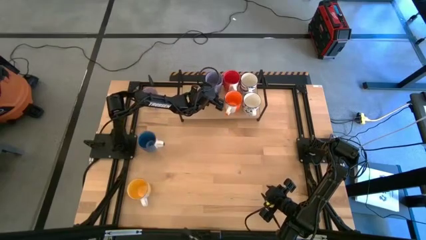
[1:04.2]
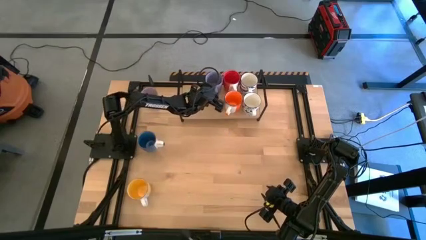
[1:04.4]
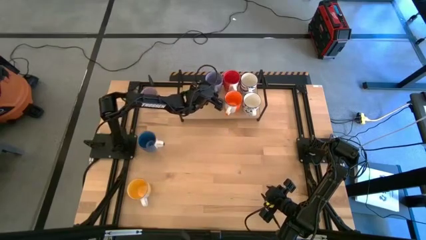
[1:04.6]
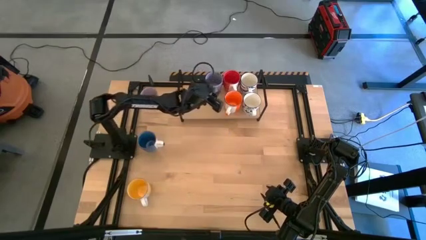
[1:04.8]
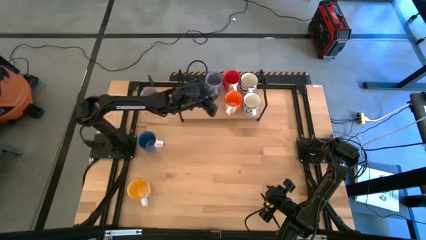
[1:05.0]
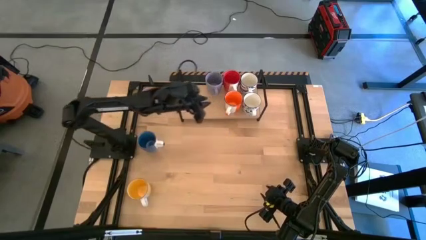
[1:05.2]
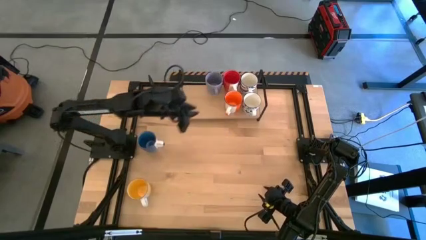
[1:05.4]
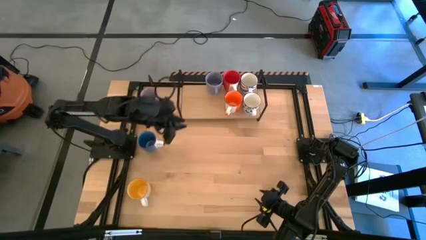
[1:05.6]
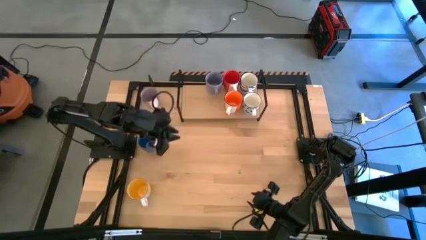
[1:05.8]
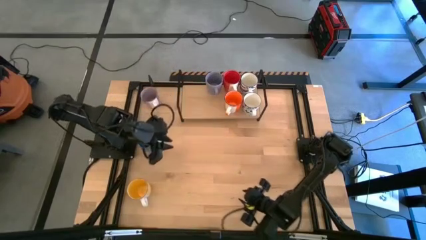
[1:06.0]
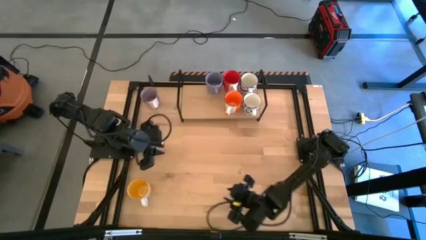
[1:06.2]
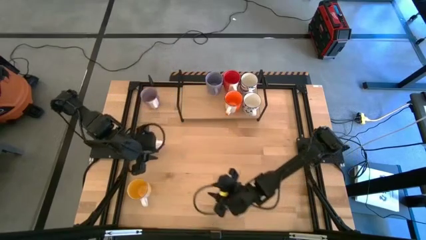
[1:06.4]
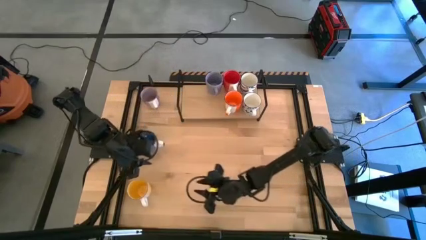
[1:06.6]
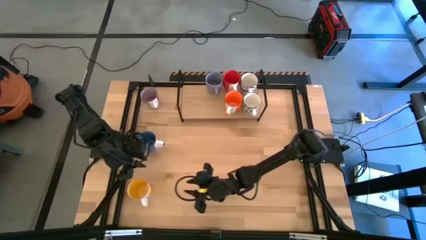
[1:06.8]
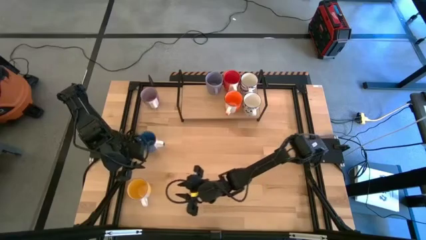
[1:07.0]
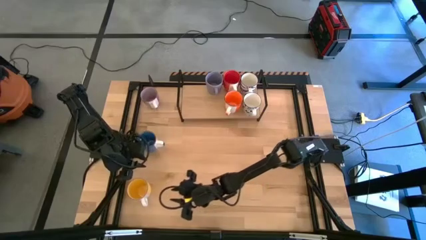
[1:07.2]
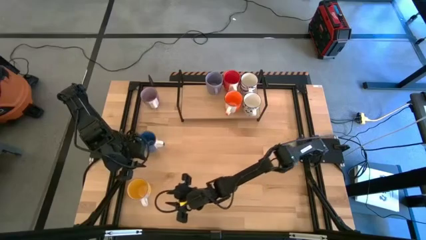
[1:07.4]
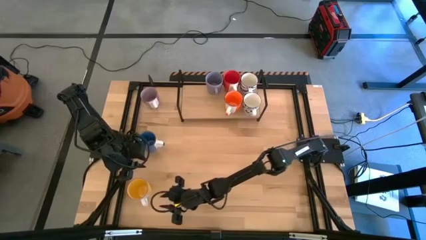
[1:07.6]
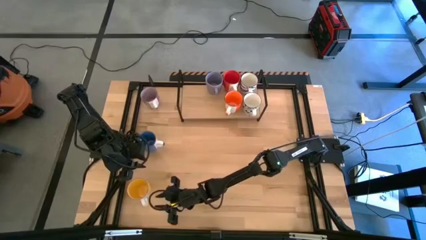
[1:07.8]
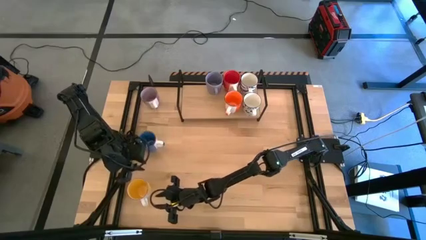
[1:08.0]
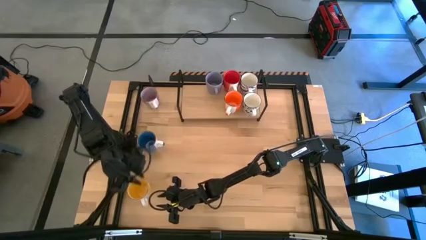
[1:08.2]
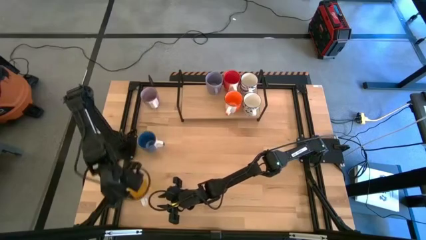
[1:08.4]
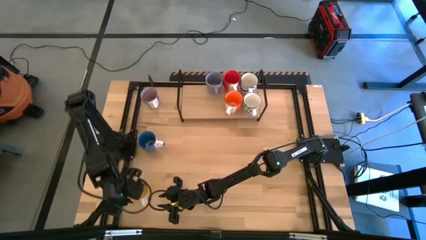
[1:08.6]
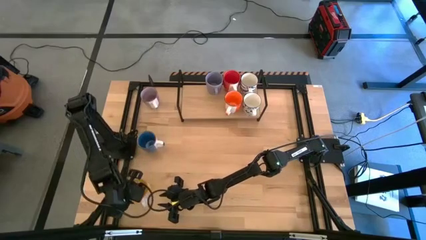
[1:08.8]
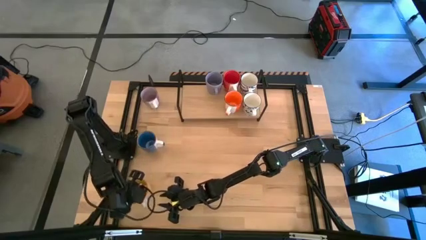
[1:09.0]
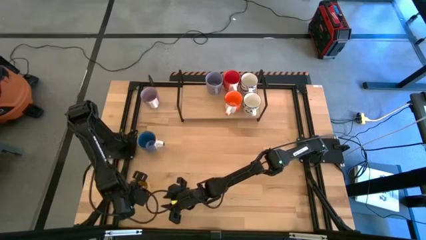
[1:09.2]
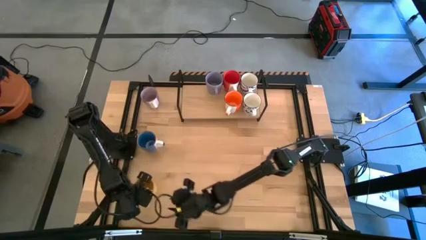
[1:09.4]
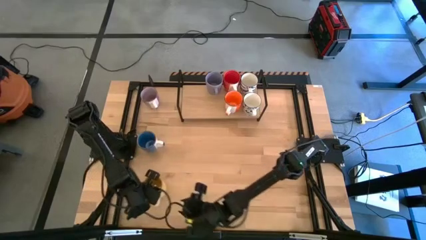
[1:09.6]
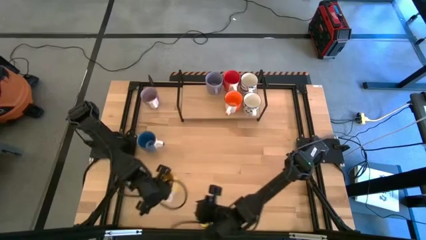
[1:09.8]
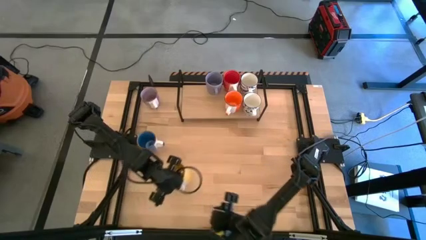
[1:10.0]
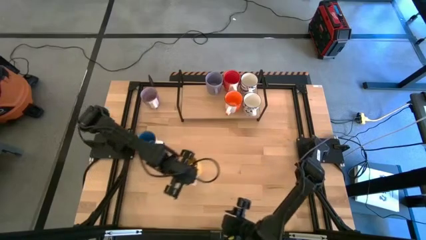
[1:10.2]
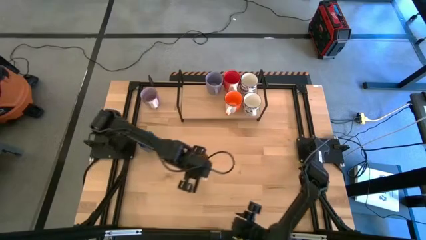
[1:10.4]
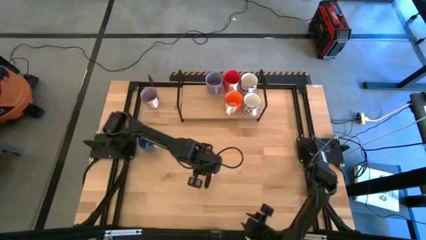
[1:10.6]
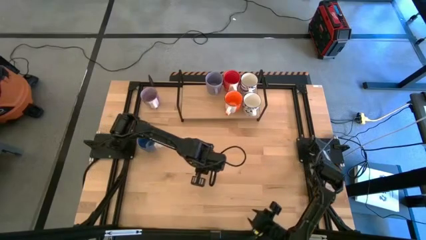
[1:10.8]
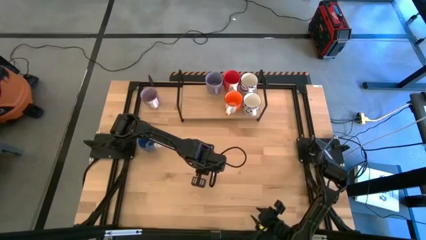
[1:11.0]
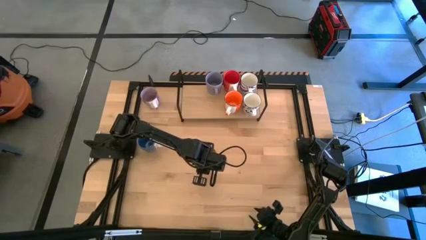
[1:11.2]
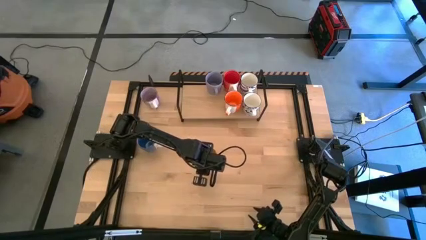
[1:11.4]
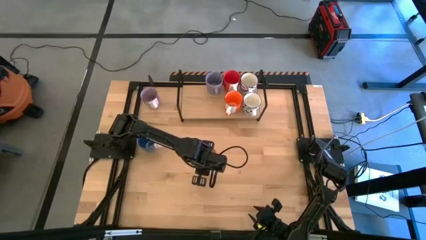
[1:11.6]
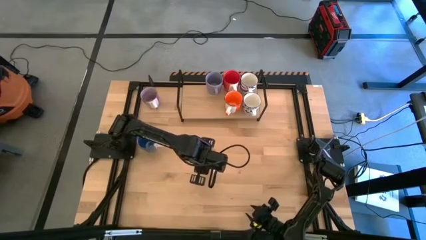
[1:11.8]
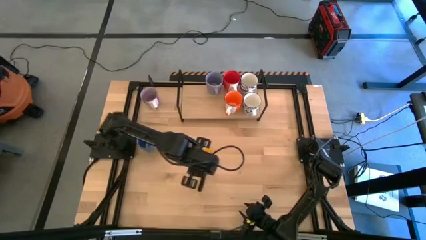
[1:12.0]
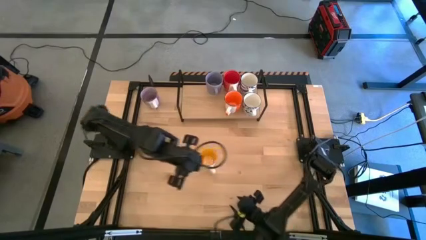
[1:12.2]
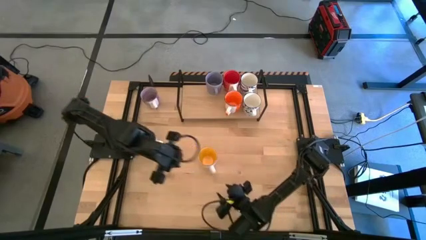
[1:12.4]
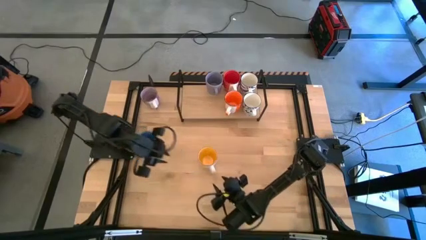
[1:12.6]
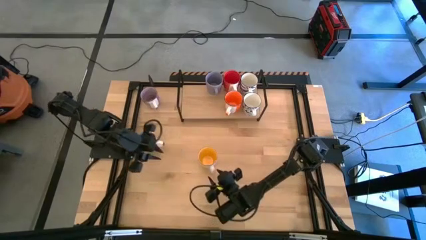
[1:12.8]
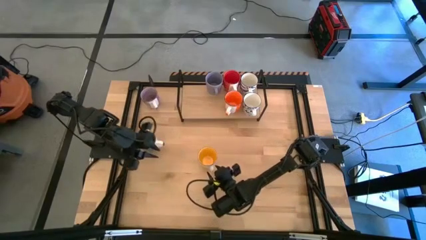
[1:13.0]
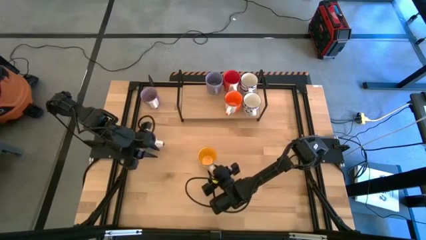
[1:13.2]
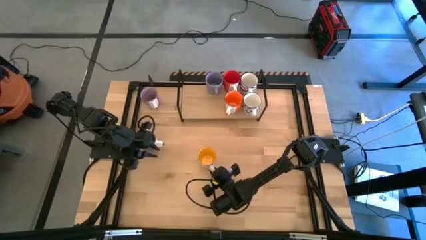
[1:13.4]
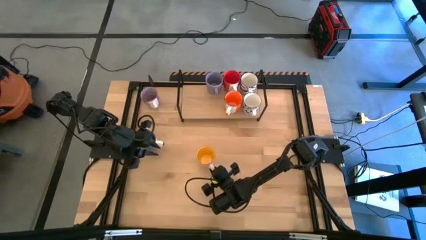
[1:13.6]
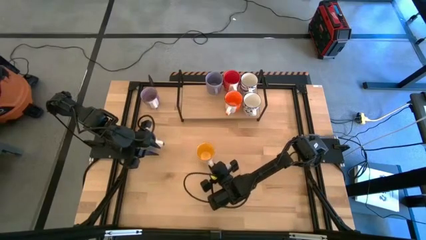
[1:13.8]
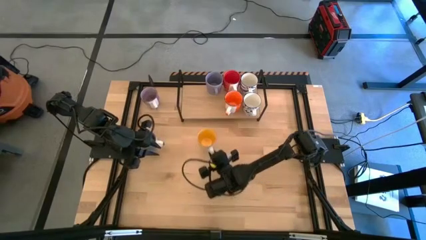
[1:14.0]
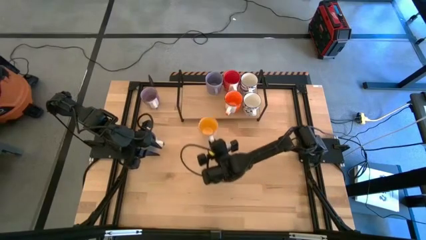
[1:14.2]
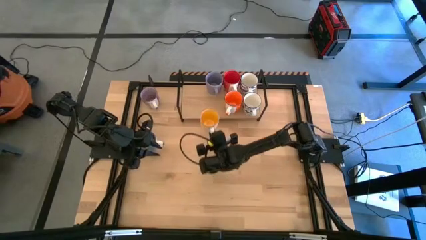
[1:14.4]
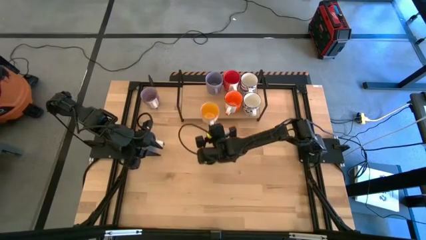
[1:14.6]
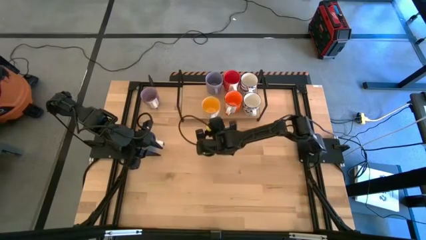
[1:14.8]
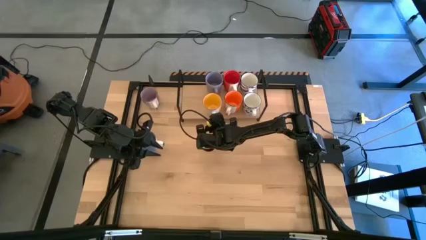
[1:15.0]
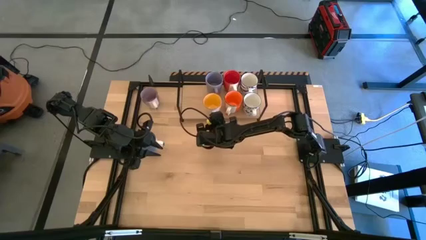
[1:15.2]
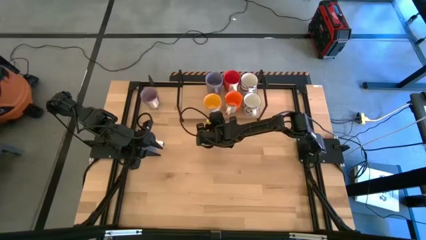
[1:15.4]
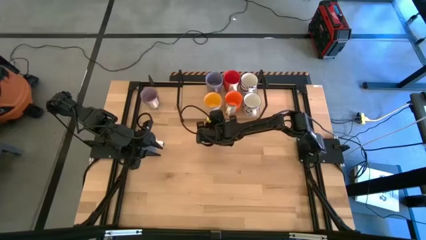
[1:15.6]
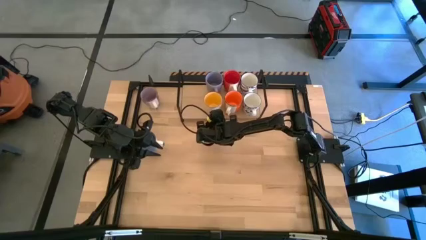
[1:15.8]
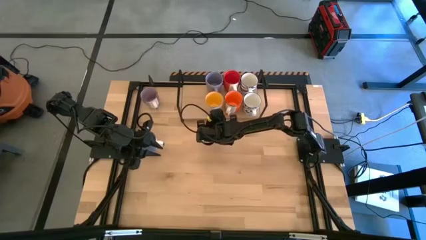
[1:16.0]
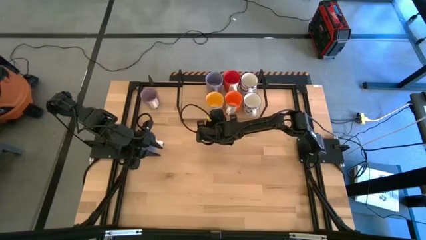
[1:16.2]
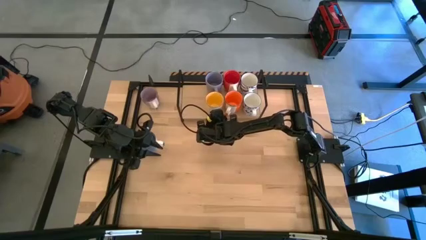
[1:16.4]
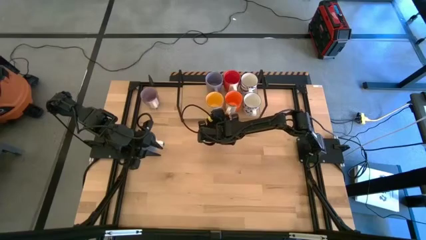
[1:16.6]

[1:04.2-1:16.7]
Task: Place coffee mugs
Put the yellow mug on the shelf

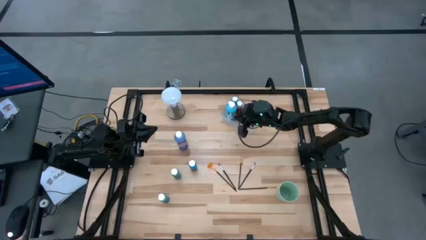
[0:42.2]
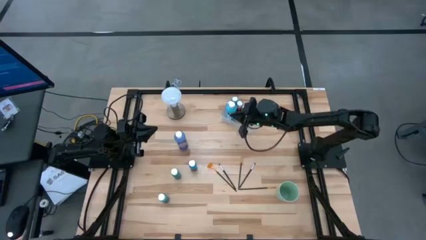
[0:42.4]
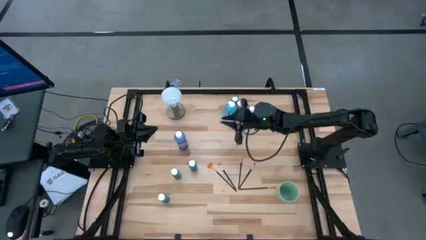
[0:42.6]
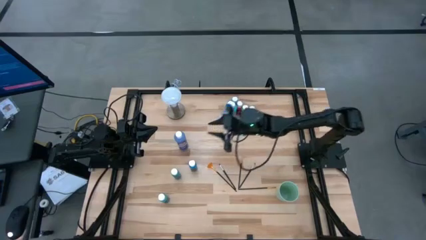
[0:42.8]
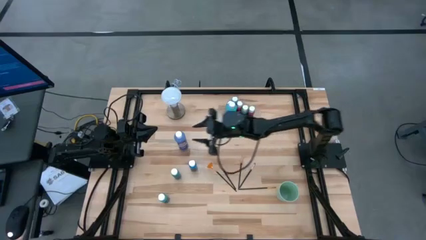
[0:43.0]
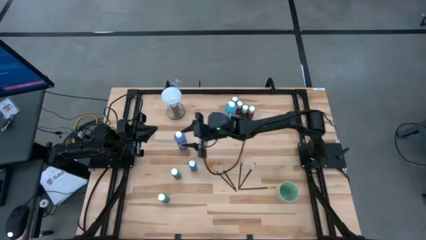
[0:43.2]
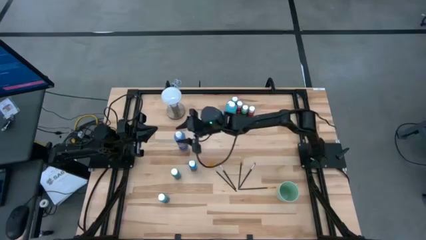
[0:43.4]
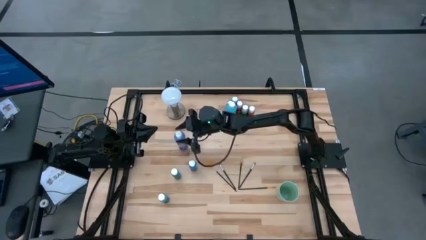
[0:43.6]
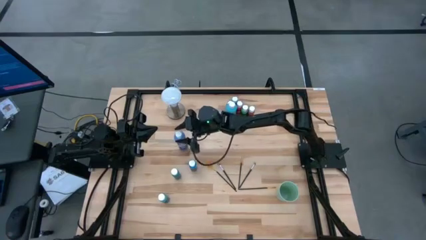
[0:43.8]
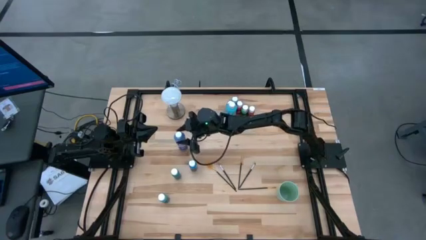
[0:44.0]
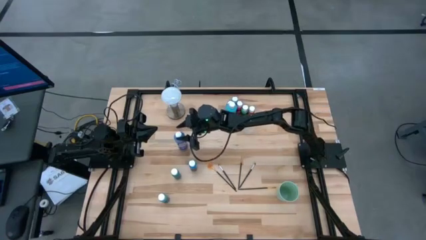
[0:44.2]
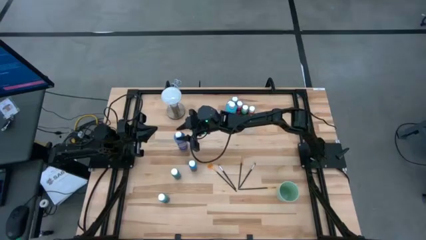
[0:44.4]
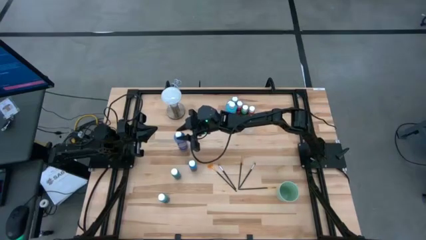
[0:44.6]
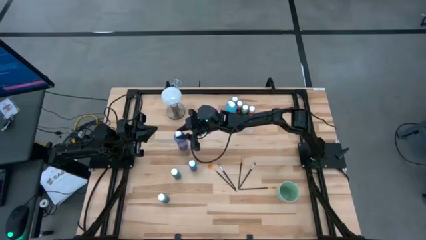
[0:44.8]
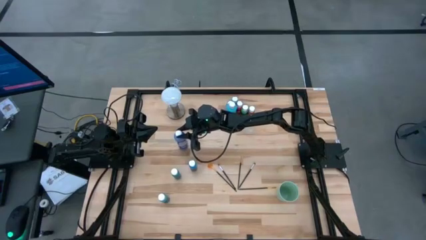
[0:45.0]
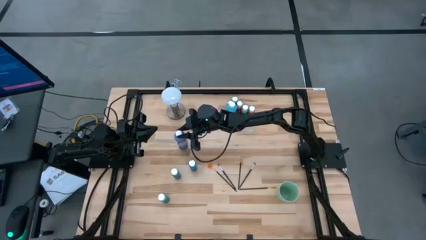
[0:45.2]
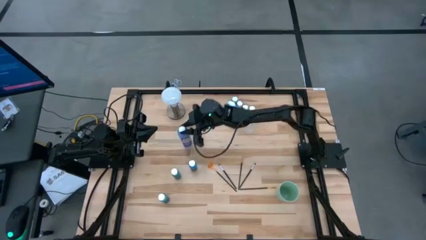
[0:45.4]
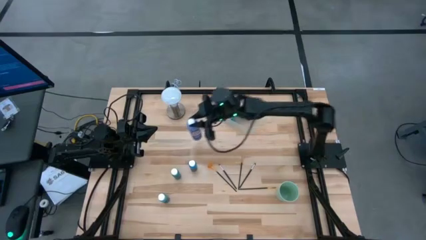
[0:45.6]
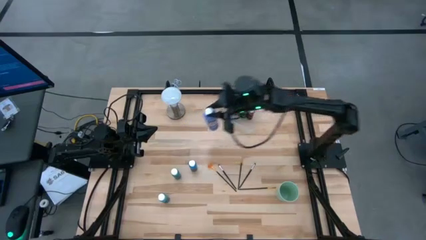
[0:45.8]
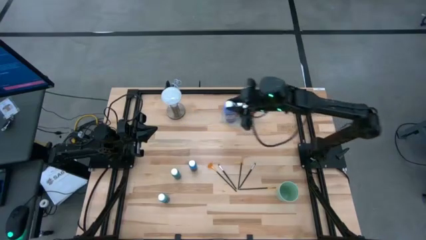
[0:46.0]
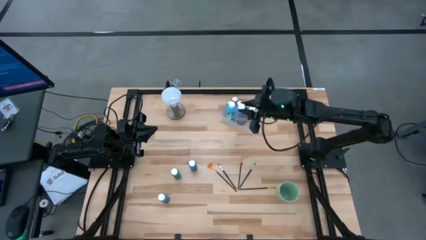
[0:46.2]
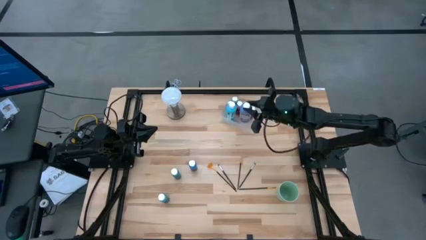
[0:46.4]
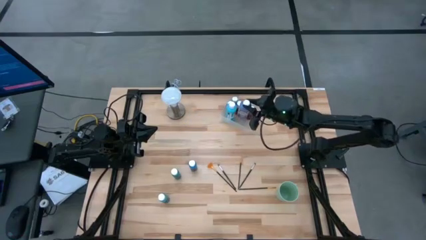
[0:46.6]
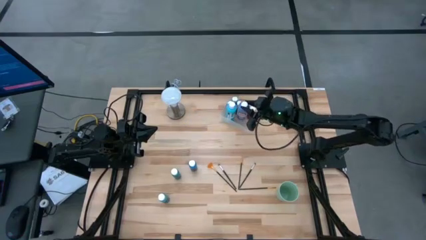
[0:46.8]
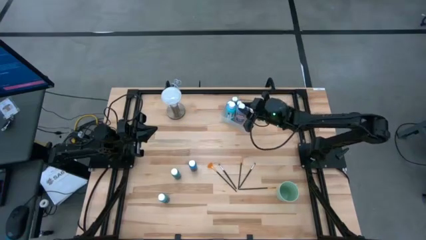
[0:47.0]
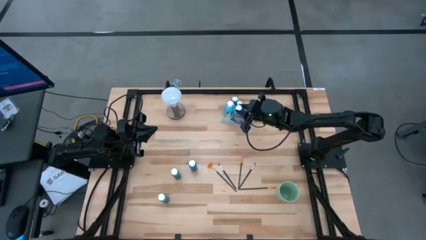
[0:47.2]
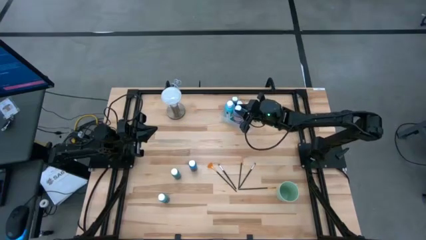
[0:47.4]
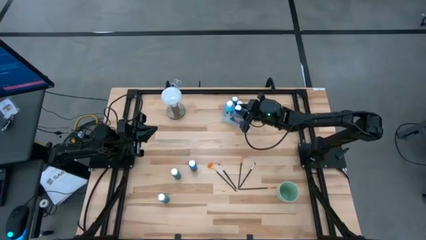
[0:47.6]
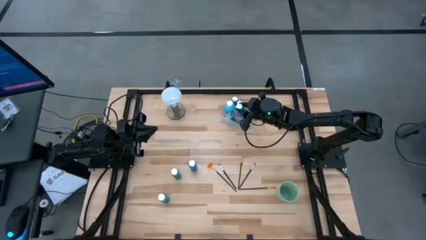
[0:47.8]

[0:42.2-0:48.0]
Task: Pick & Place Paint Supplies
Put the large blue paint bottle into the transparent bin
